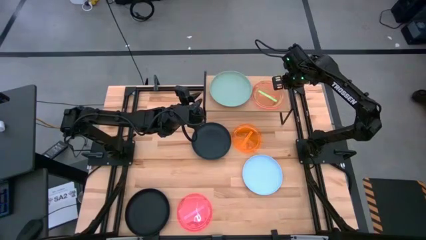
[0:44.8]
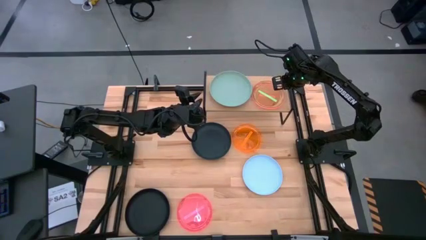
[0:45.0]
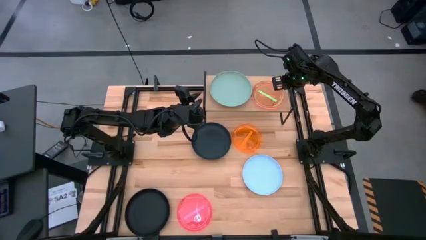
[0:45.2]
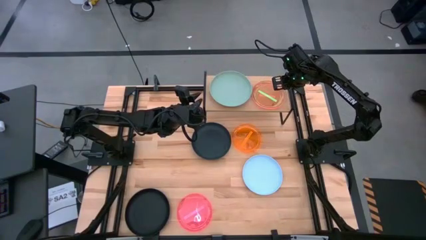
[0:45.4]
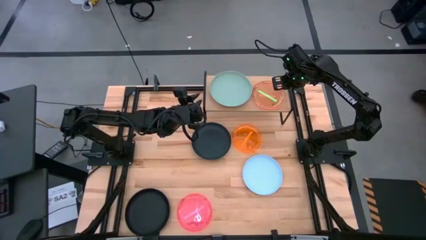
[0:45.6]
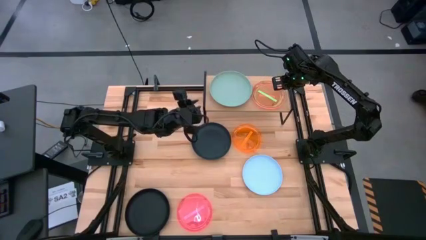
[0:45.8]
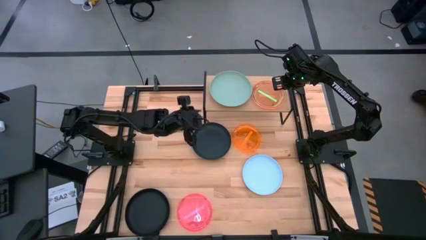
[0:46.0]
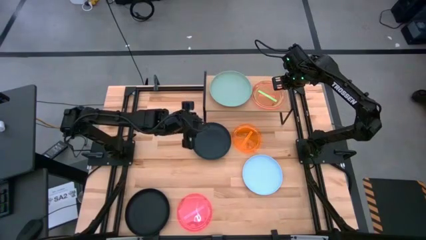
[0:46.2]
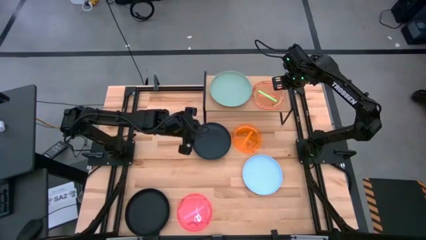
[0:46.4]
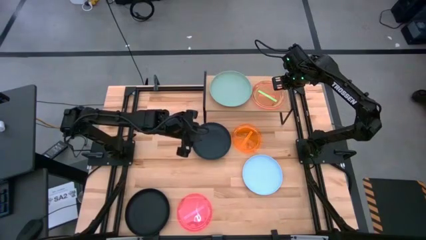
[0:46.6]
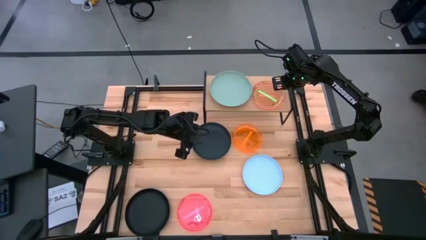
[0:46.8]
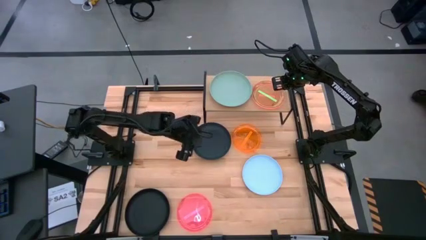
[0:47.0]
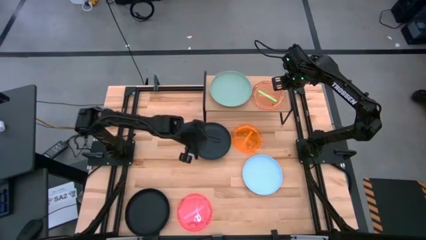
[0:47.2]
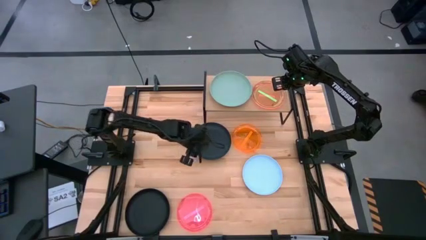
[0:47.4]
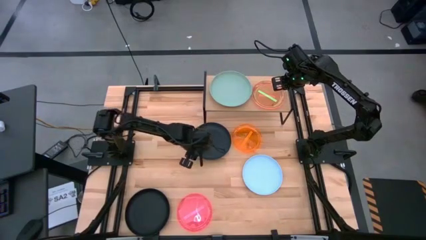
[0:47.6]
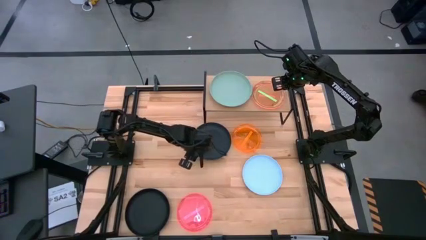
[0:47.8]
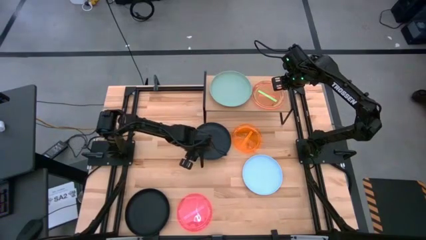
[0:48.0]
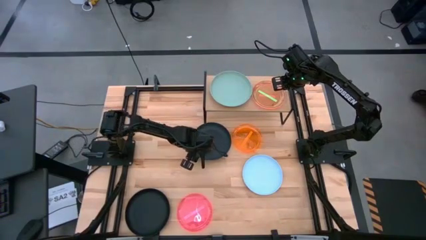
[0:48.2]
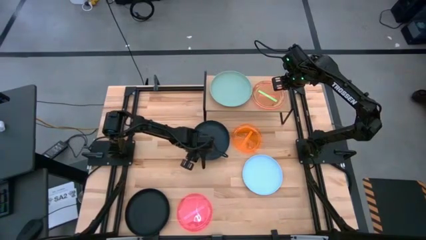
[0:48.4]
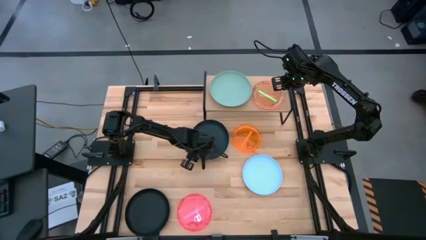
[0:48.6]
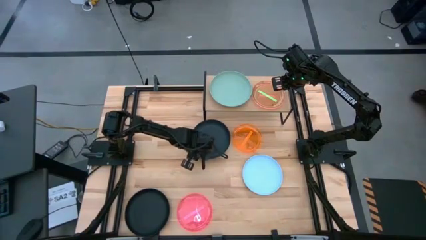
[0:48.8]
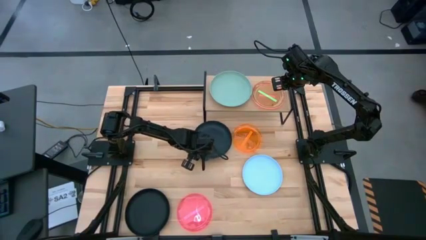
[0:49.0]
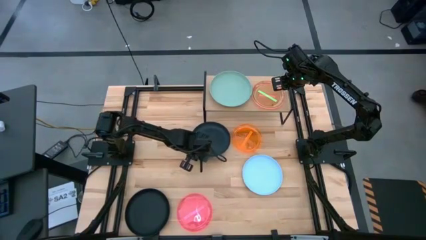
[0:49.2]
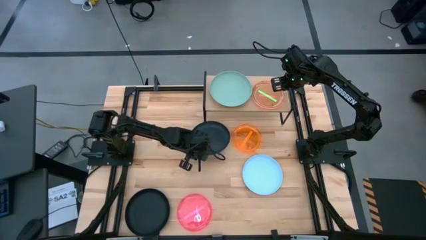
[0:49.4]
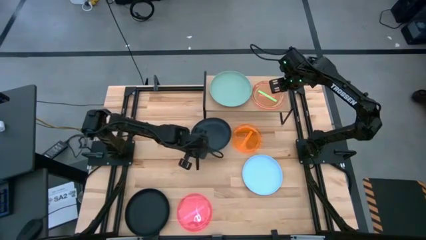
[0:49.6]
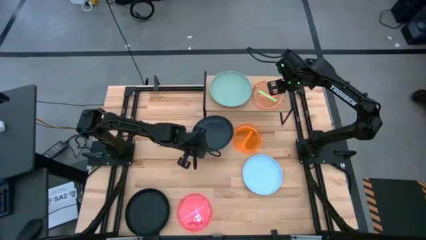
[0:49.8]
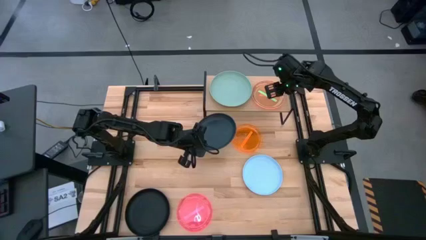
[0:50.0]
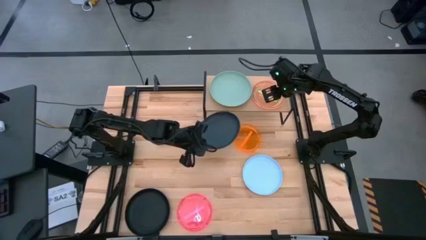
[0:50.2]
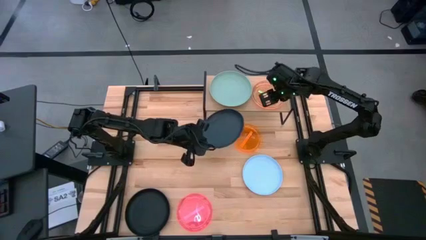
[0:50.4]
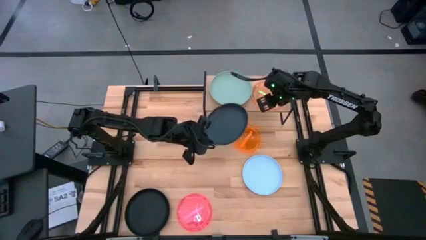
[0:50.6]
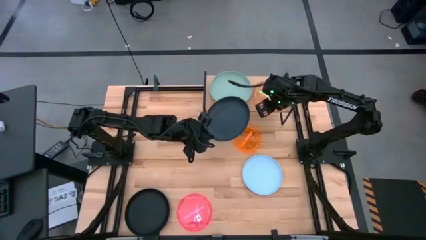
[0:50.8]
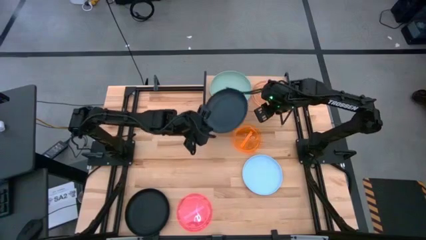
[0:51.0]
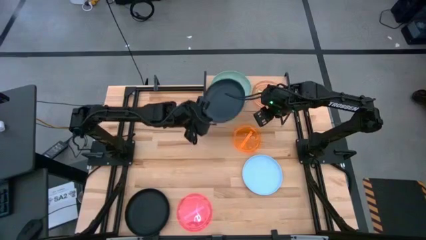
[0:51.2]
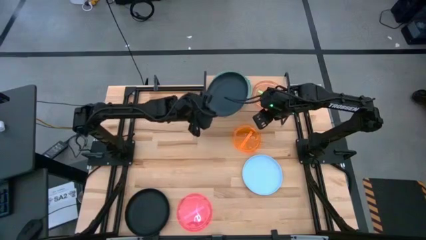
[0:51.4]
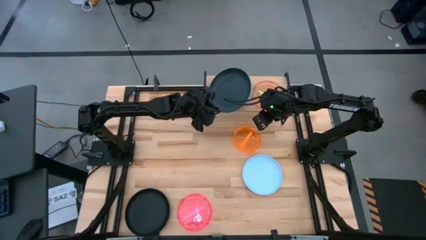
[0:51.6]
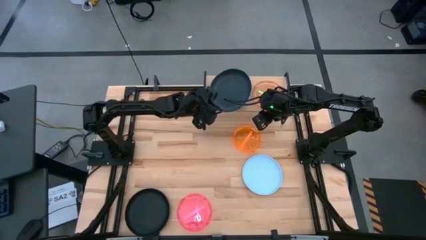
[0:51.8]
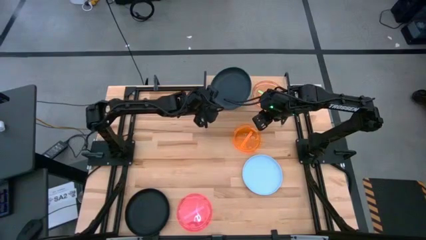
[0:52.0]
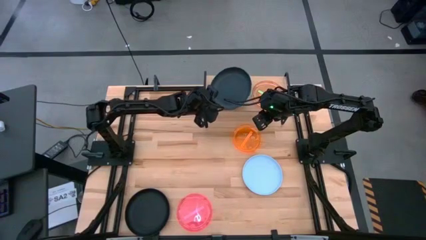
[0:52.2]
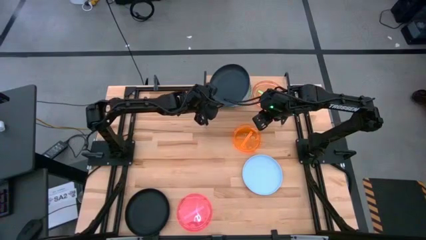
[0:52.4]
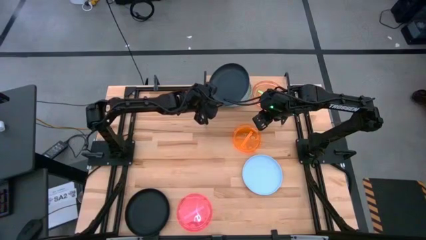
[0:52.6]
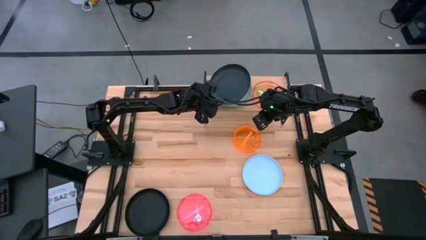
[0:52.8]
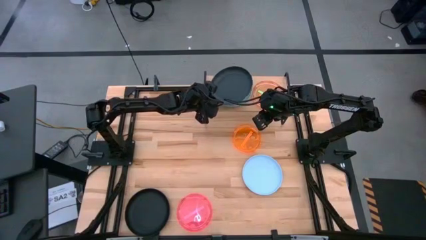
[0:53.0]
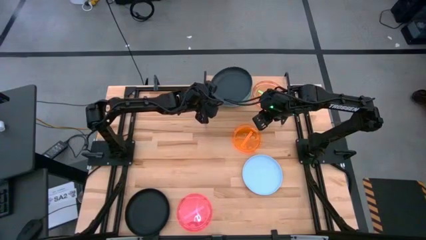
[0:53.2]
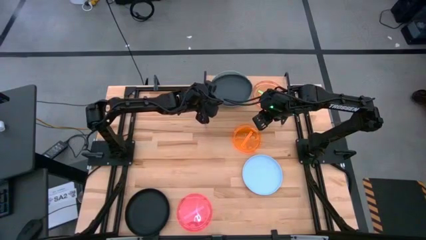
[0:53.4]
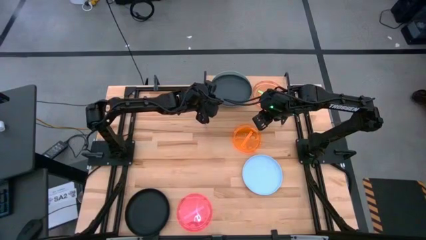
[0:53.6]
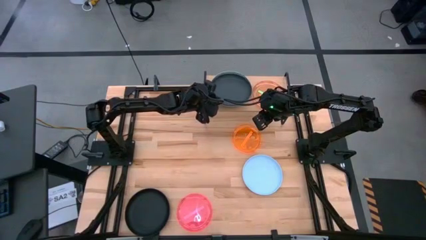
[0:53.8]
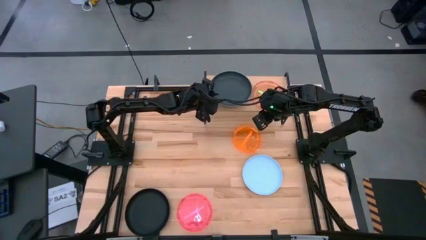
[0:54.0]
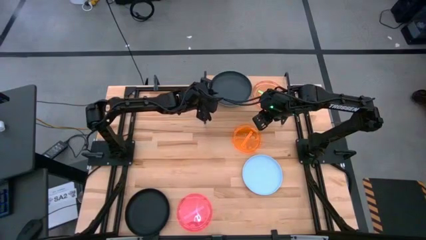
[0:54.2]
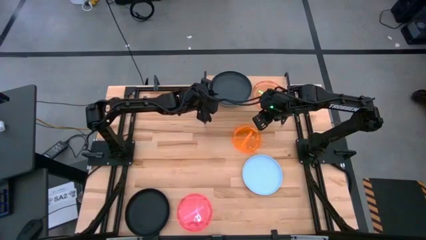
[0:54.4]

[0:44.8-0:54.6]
Task: Place and stack plates onto a shelf
Stack the top black plate on top of the blue plate on the shelf

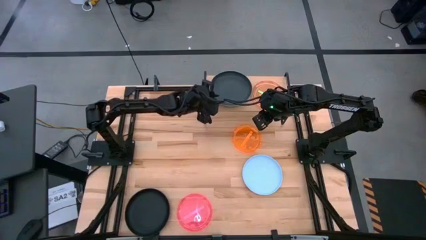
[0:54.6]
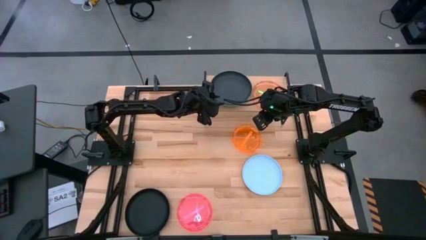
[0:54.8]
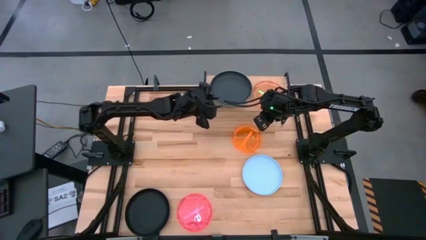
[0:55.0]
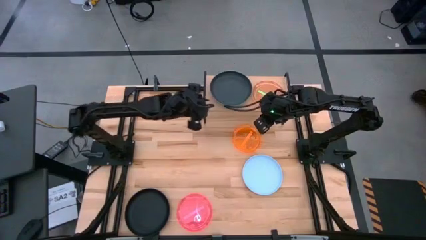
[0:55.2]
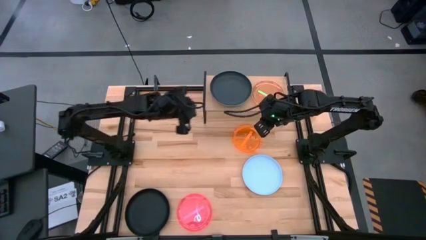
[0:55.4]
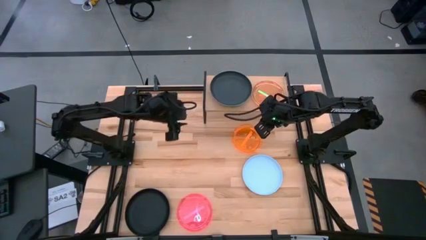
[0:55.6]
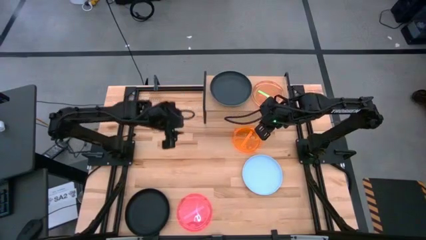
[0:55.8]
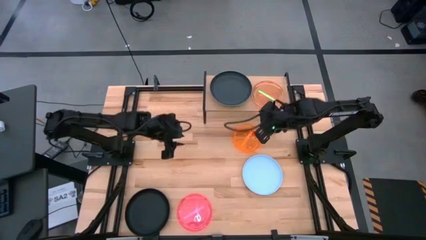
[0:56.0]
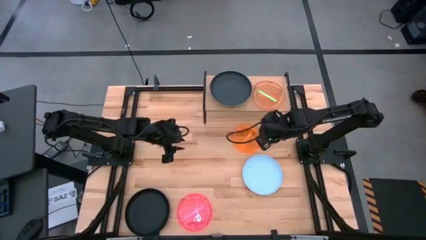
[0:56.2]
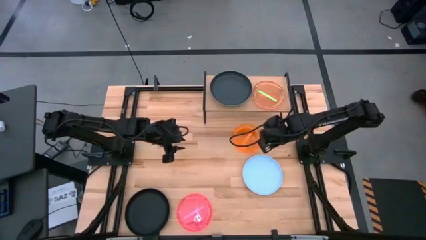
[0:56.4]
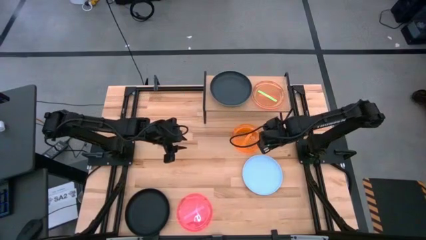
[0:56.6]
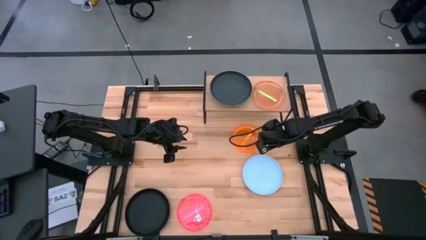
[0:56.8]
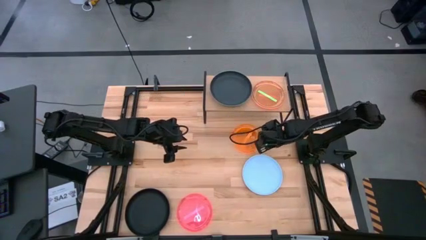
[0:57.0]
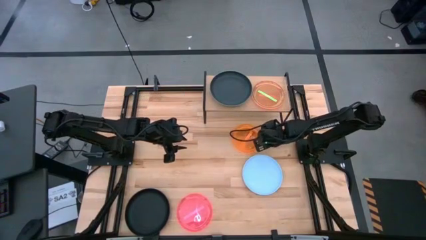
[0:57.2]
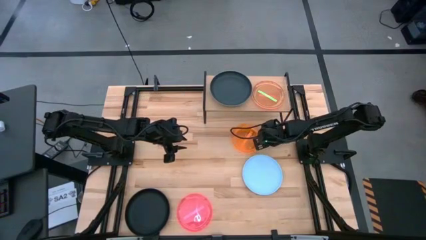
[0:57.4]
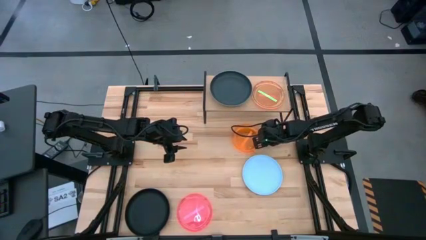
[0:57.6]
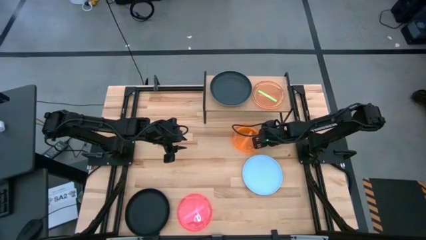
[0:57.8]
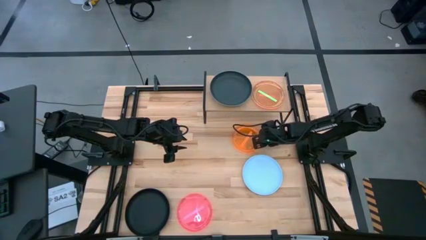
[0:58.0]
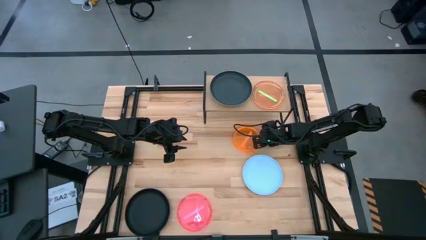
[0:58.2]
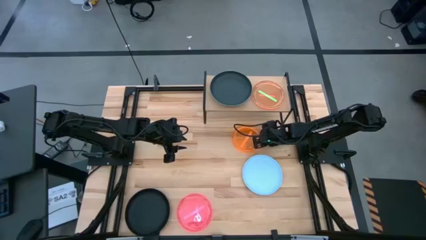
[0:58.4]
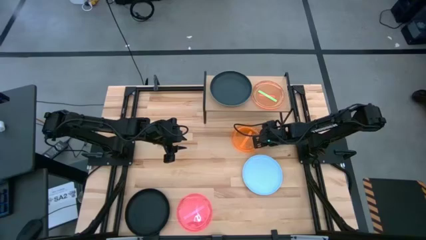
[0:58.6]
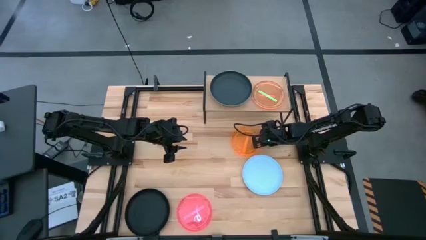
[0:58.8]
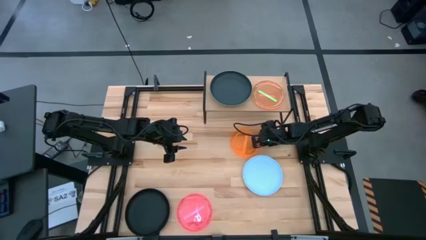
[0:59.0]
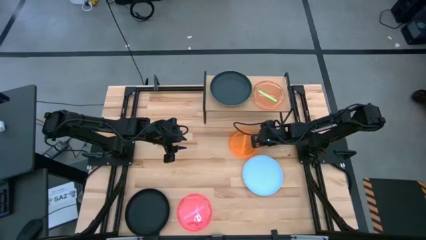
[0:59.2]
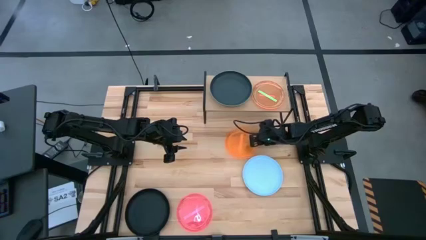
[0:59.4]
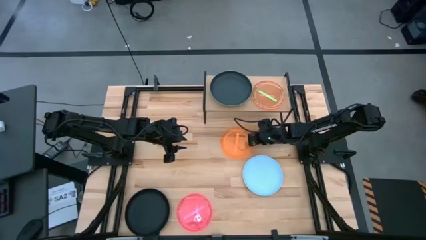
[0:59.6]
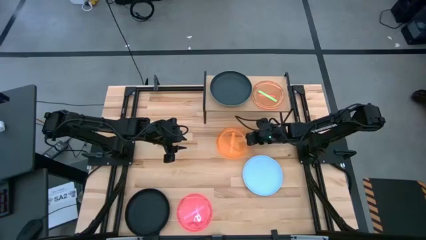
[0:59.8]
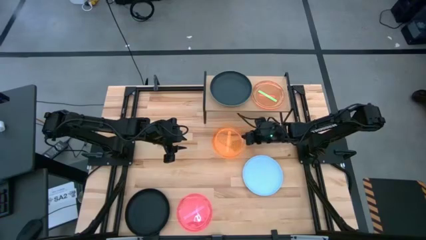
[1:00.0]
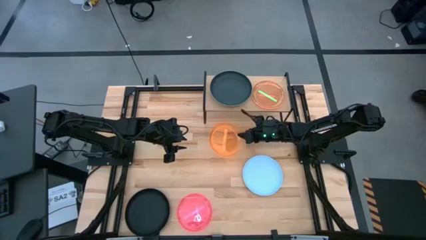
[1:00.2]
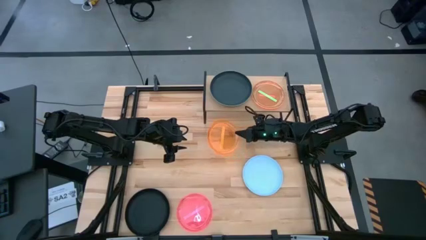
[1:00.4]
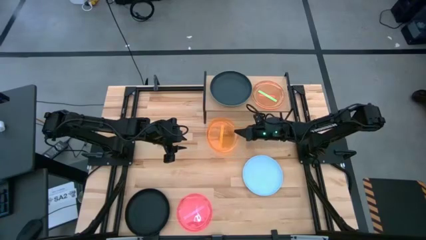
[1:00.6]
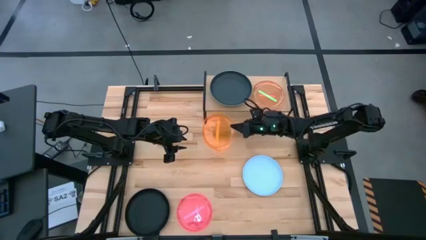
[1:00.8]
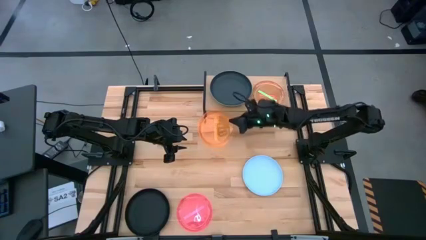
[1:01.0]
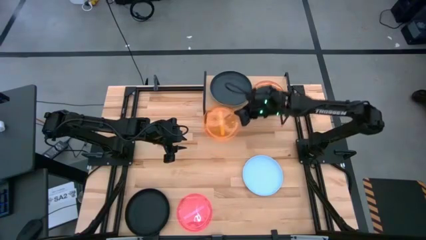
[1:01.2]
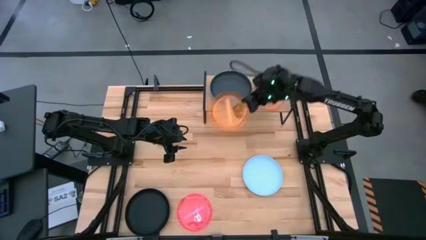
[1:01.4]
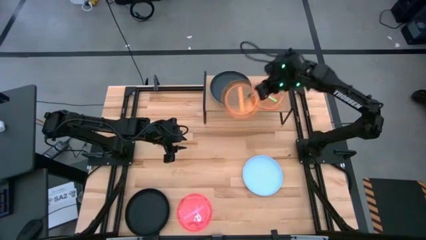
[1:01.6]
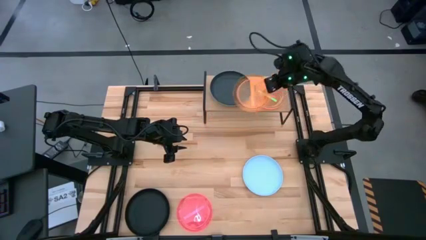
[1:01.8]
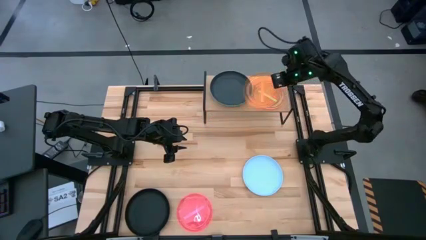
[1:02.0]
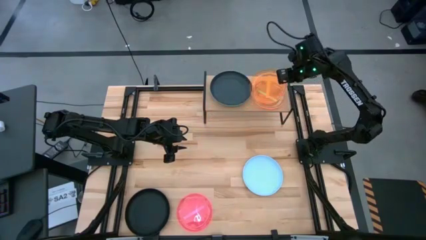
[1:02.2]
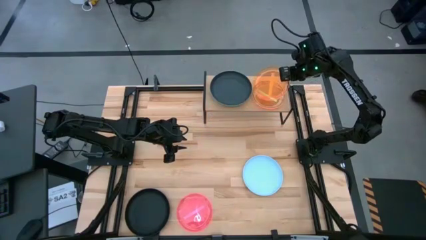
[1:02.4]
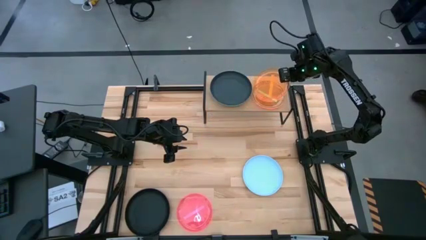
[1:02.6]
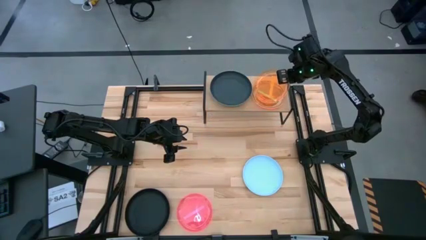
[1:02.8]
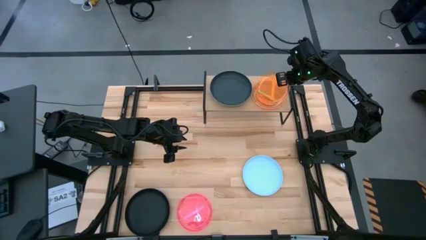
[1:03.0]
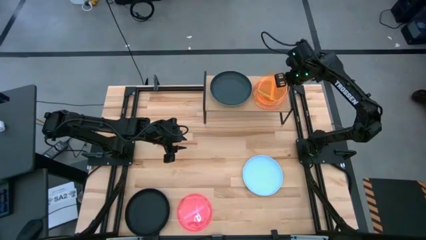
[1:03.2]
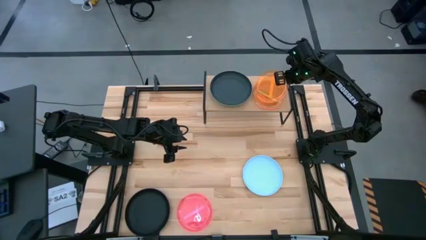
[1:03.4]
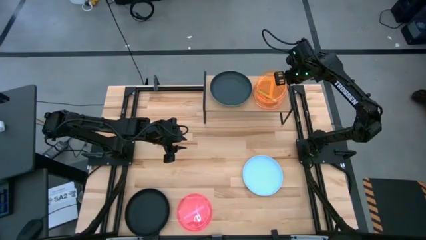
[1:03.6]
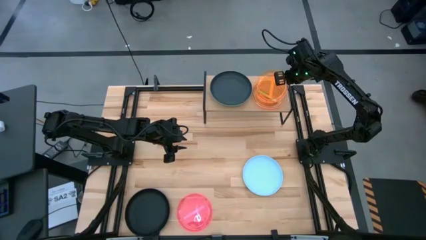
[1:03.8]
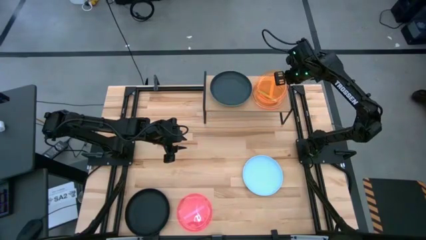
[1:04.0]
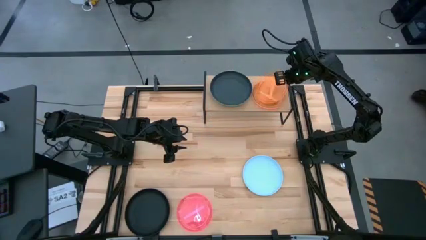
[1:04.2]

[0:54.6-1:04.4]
Stack the orange plate on top of the green plate on the shelf
